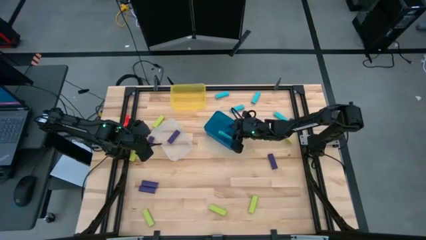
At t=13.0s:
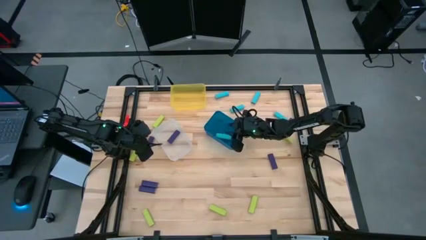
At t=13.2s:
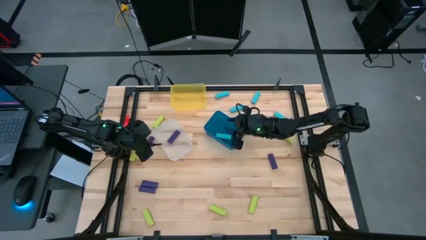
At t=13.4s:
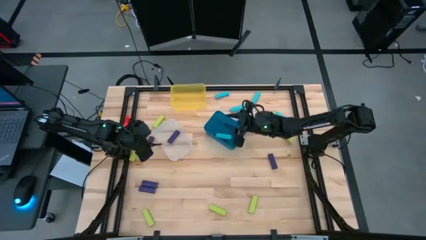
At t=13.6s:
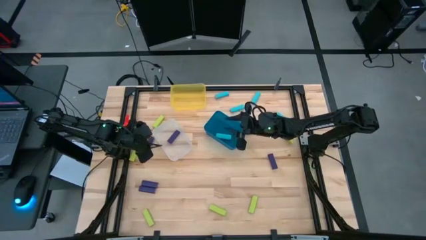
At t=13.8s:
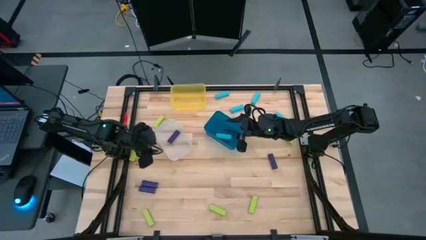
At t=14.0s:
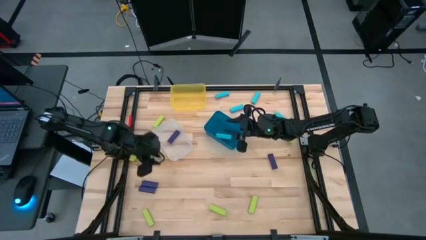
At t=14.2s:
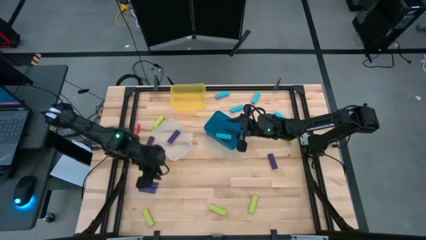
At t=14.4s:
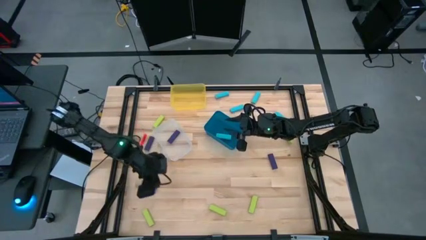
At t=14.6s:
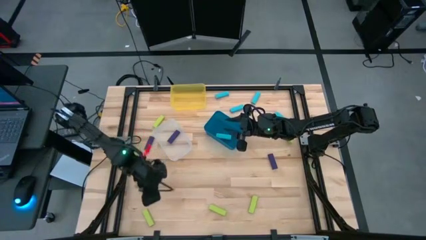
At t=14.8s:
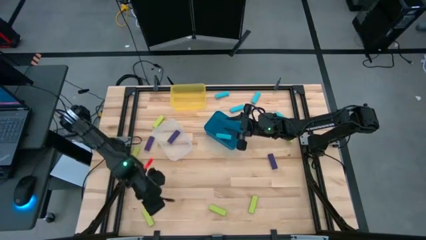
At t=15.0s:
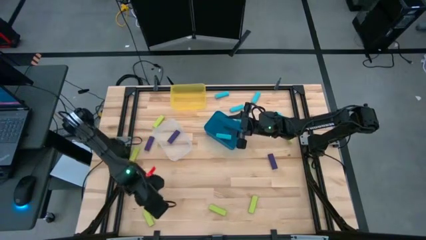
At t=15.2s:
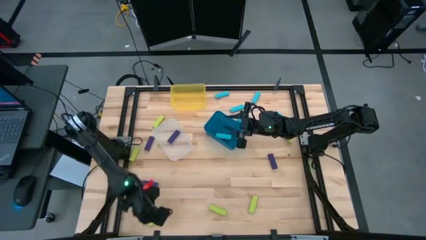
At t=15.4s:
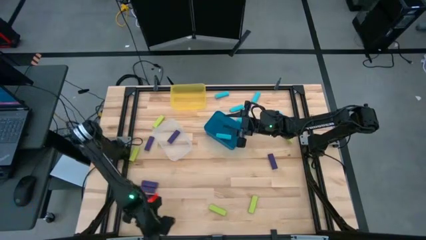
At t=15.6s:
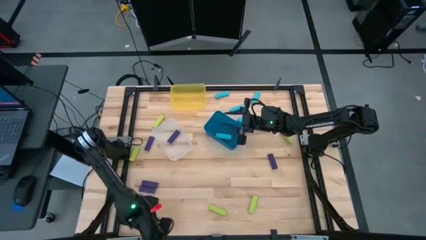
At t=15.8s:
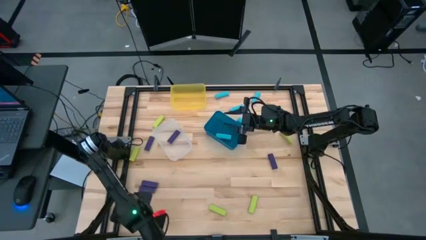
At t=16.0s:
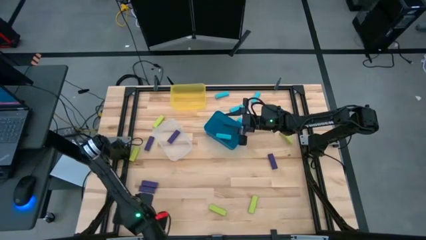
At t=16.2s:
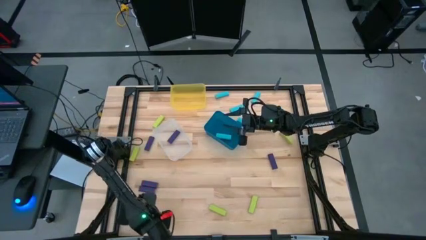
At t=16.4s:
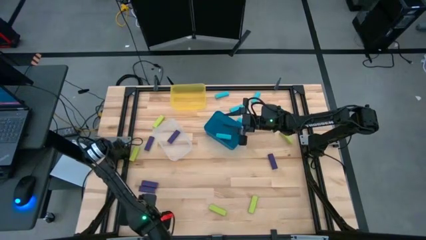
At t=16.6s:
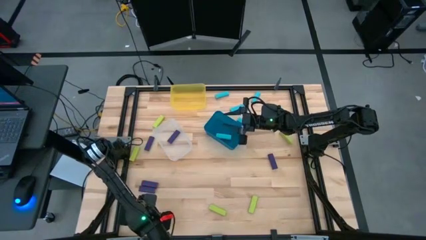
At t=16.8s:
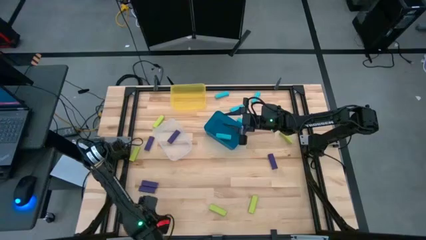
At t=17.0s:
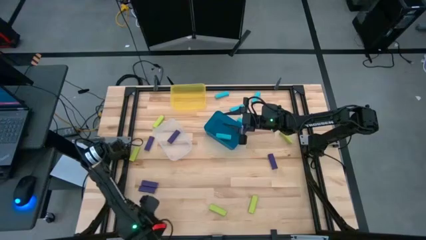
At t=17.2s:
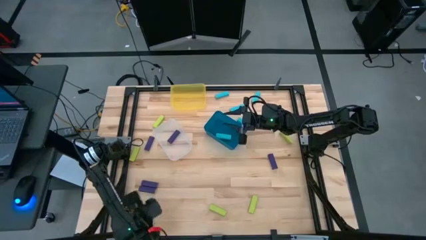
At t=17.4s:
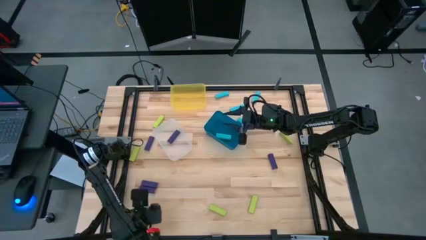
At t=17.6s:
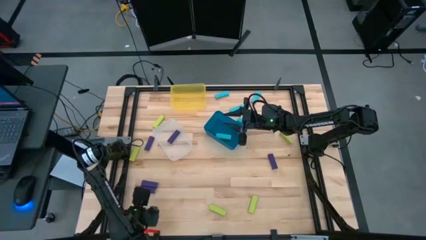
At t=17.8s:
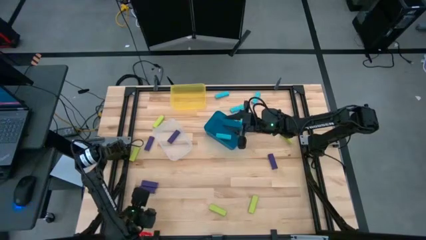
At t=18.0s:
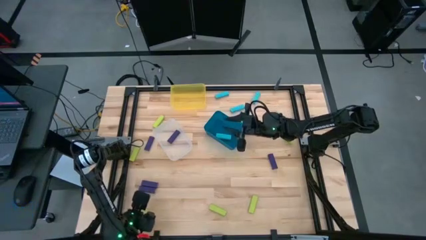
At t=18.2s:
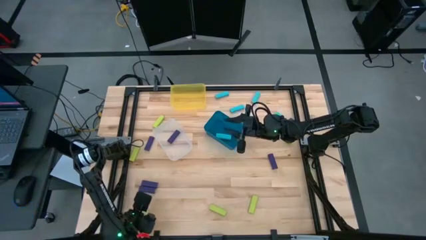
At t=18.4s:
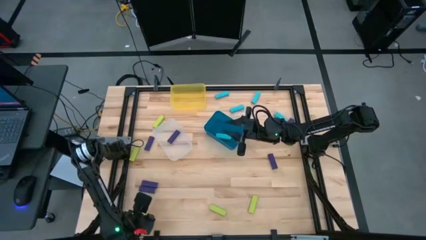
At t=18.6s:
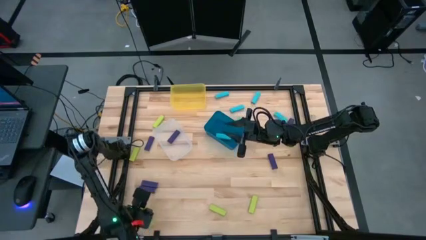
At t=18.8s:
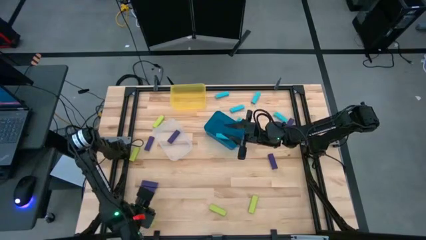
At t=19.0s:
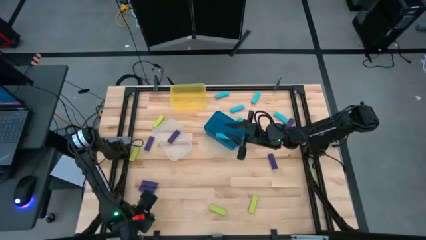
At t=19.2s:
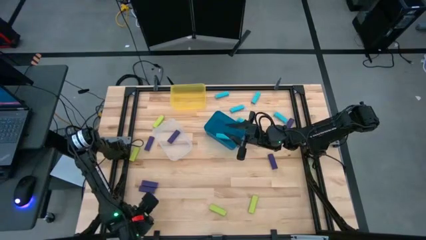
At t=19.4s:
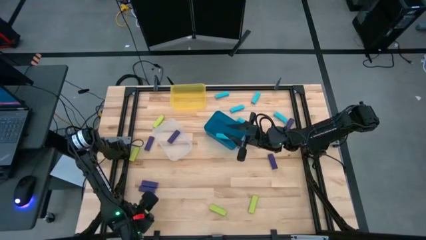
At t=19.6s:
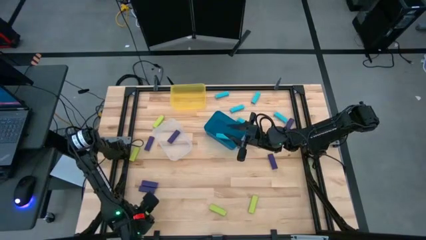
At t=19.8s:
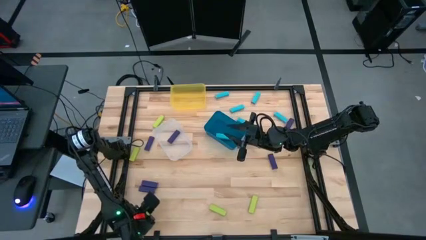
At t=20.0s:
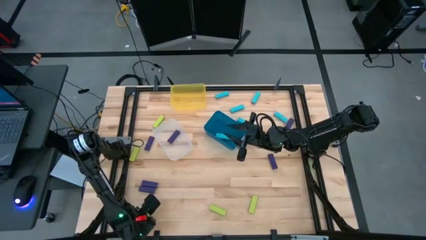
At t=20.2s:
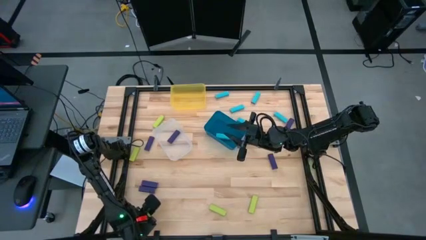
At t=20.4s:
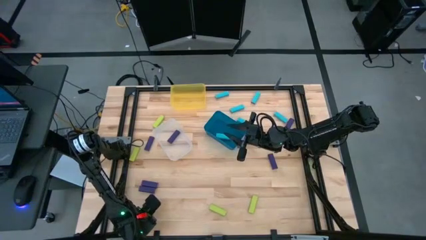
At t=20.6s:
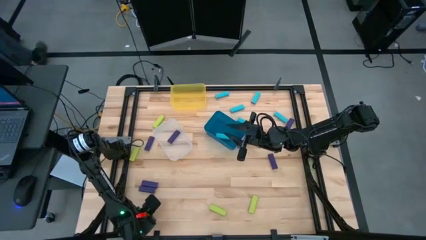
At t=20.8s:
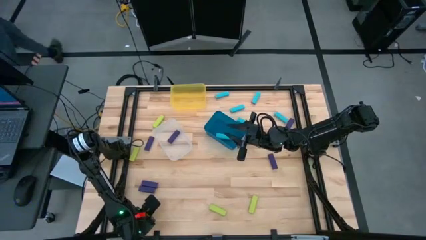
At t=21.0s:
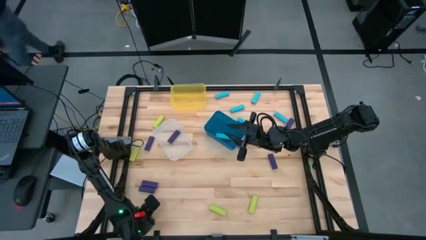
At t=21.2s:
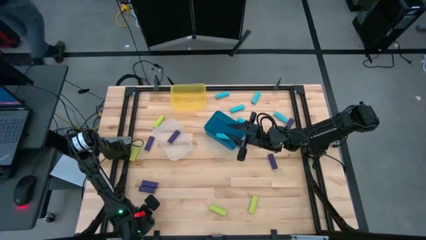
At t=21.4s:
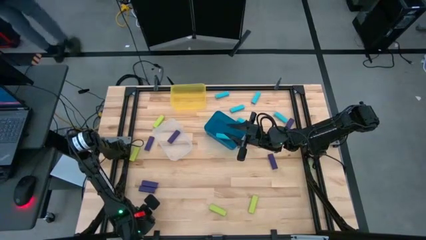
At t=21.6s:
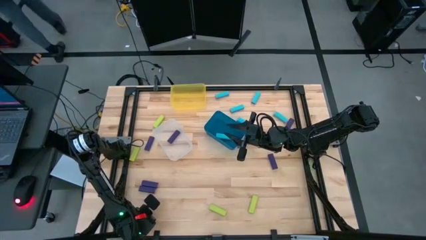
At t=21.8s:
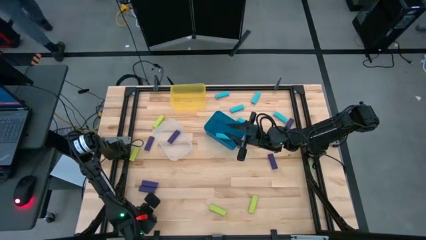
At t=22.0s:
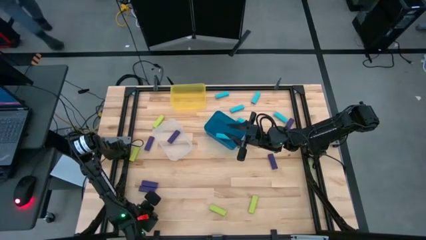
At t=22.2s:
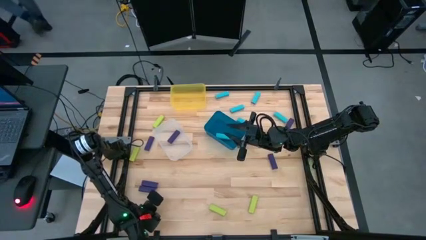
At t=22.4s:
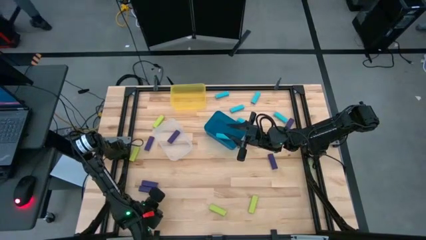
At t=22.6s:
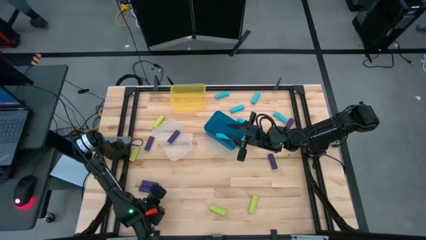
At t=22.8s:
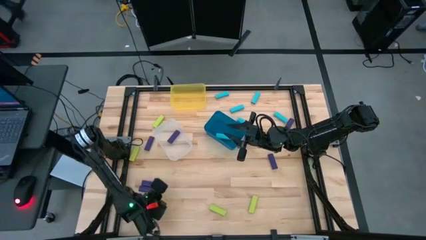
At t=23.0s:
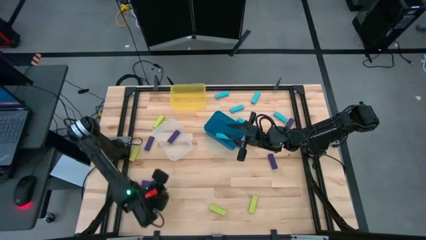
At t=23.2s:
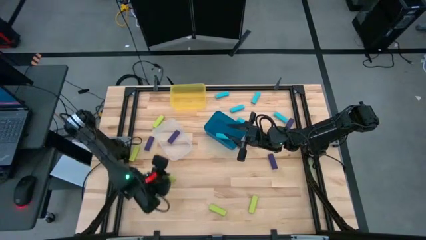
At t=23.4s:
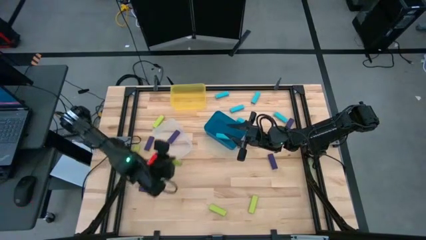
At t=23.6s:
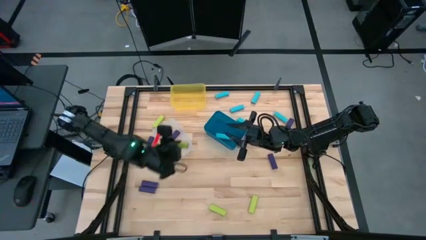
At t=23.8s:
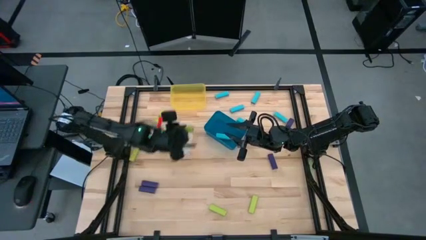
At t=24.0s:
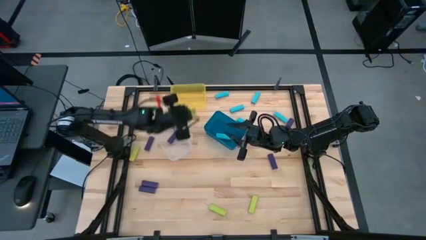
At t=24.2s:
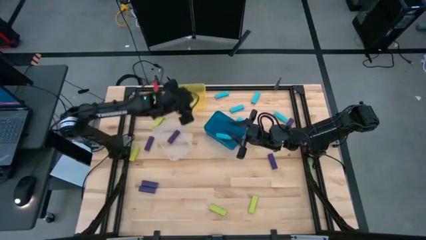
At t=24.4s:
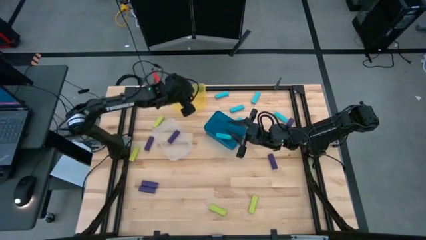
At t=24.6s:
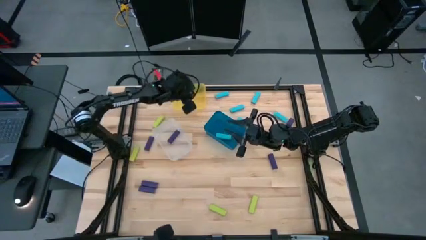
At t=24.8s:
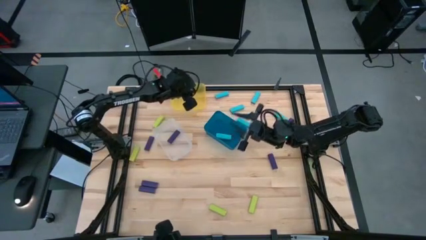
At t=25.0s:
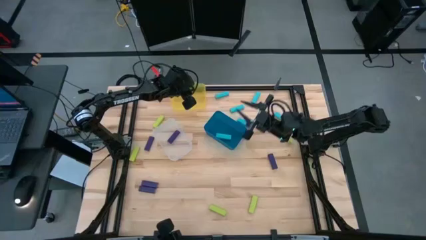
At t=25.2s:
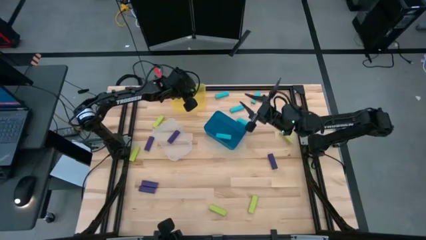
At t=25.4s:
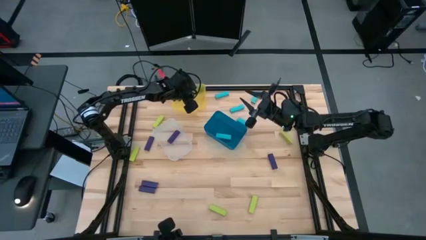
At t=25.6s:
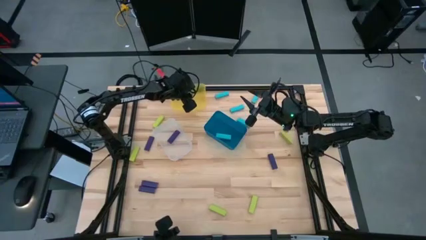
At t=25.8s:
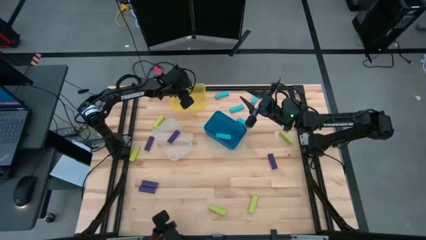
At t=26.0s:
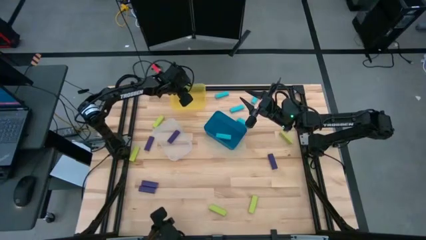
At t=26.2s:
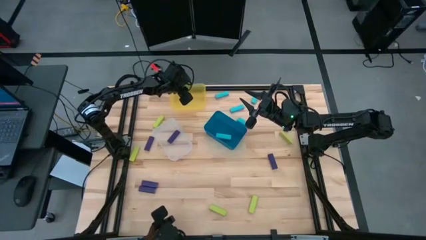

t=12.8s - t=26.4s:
Task: Sort blocks
Put the green block into the yellow bin

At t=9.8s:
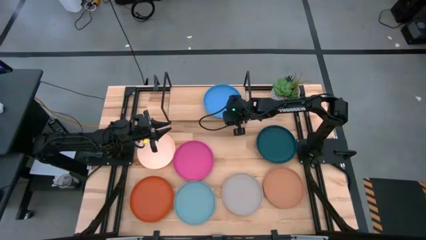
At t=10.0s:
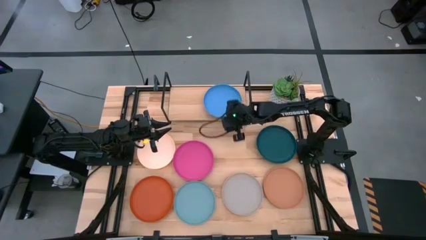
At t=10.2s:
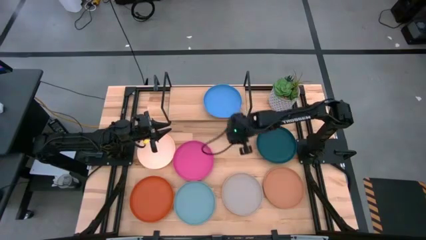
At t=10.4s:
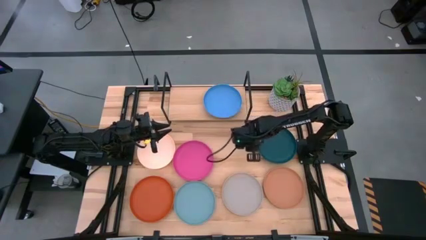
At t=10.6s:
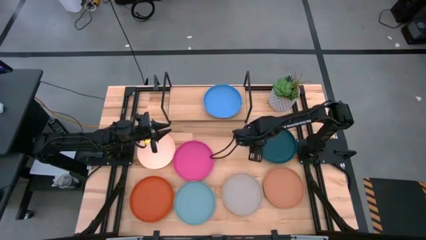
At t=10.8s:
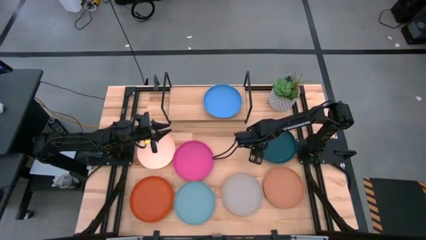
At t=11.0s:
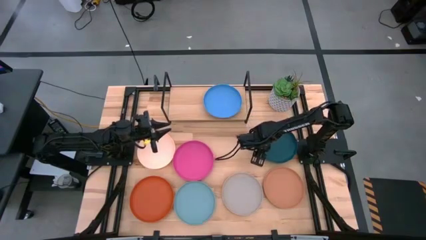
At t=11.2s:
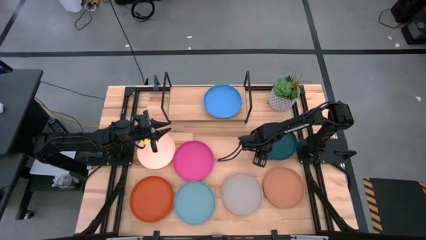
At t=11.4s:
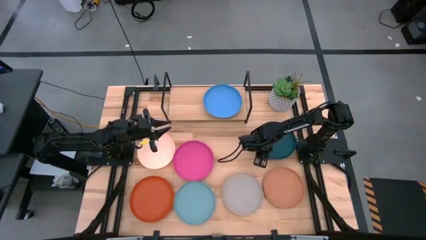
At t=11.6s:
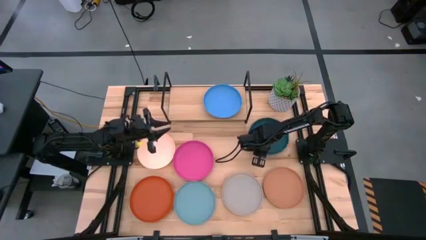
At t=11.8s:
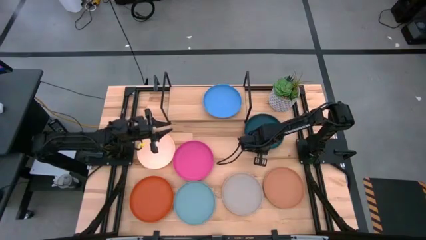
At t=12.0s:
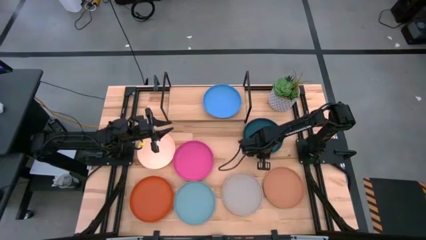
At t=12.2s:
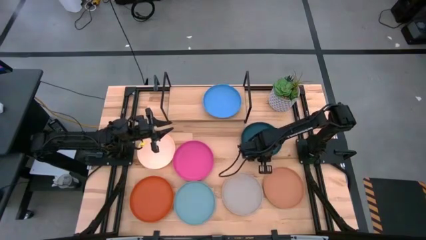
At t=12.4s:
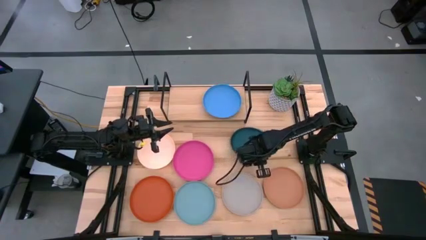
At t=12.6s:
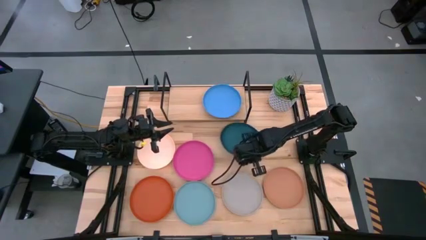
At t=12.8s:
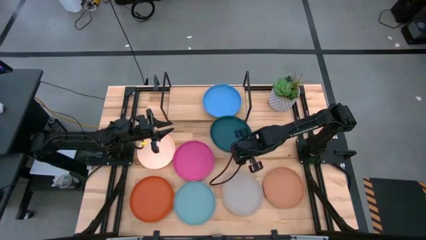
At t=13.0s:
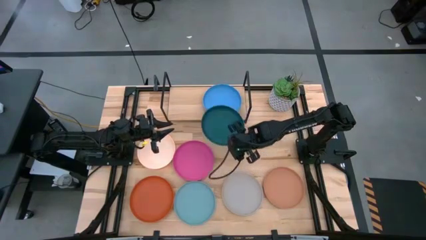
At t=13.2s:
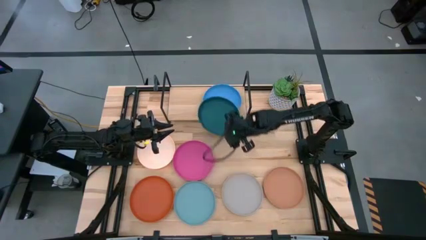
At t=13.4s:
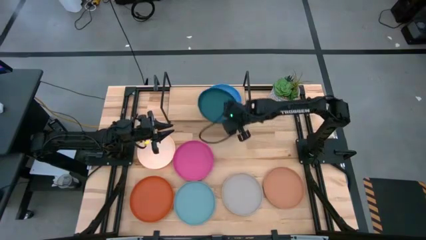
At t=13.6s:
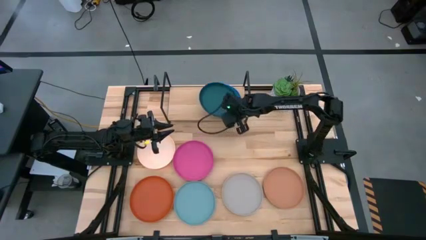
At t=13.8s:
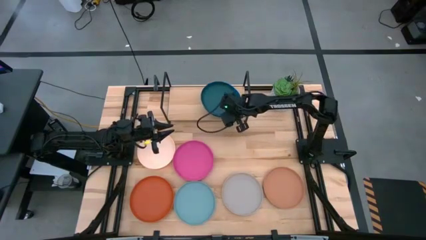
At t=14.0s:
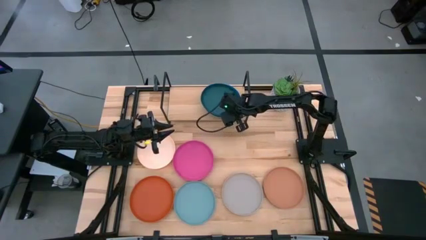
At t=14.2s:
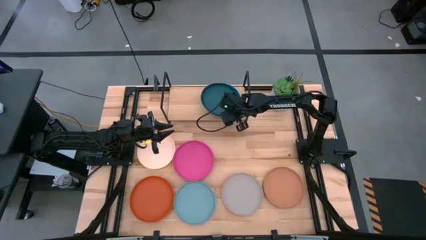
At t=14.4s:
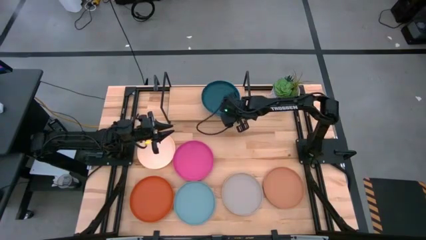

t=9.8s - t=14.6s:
Task: Place and stack plates onto a shelf
Stack the dark blue plate on top of the blue plate on the shelf
